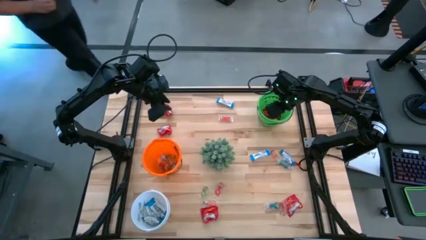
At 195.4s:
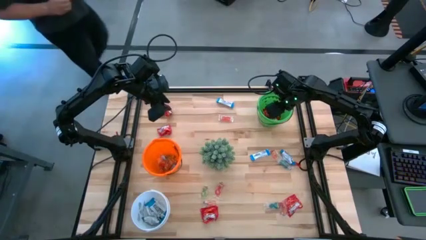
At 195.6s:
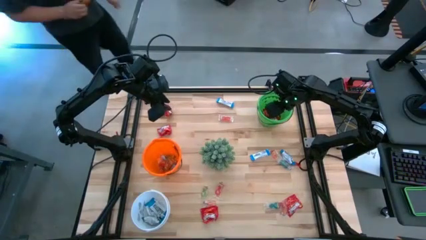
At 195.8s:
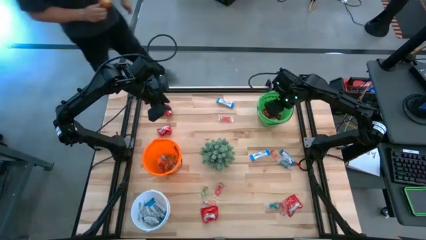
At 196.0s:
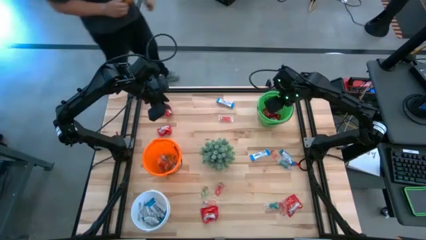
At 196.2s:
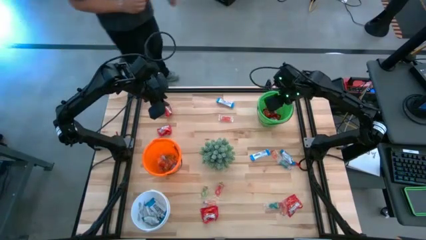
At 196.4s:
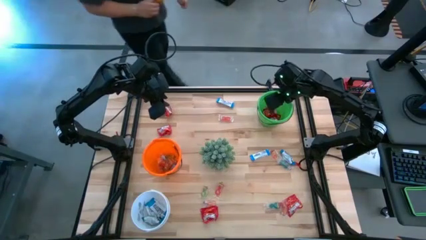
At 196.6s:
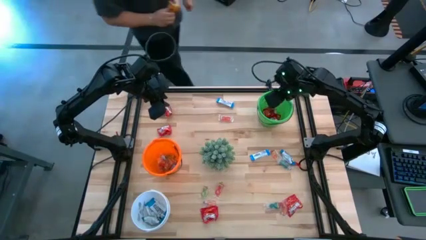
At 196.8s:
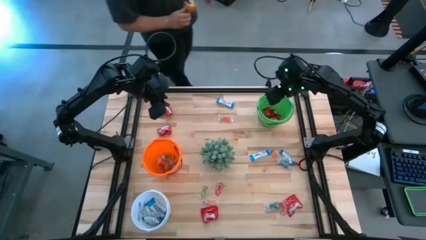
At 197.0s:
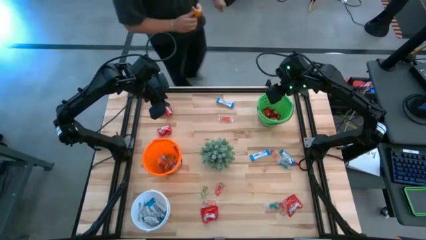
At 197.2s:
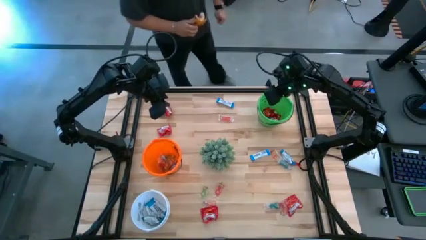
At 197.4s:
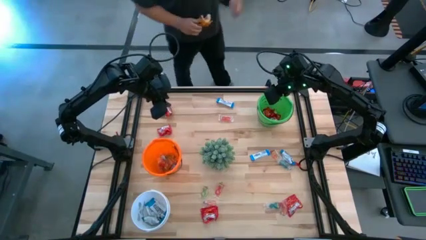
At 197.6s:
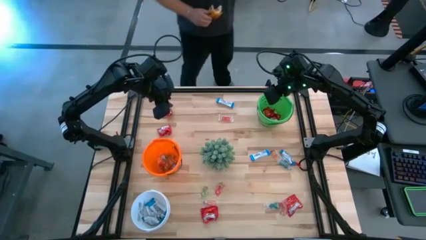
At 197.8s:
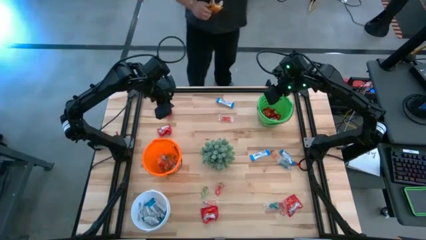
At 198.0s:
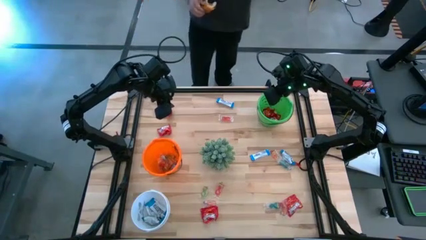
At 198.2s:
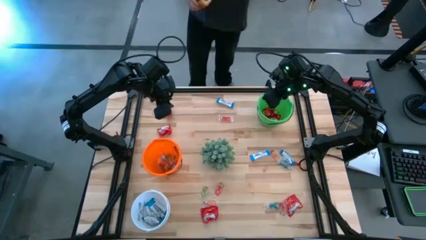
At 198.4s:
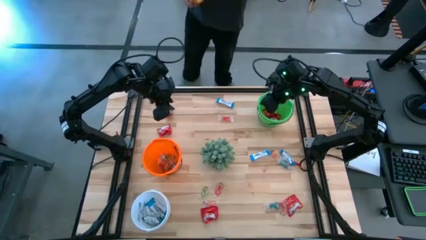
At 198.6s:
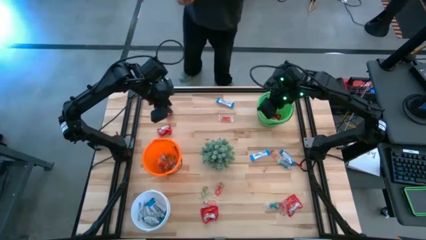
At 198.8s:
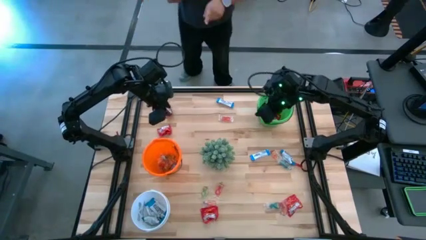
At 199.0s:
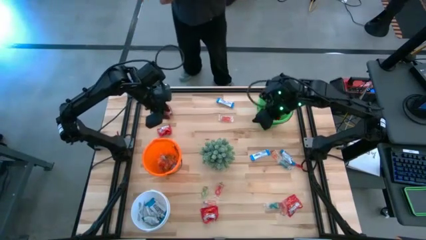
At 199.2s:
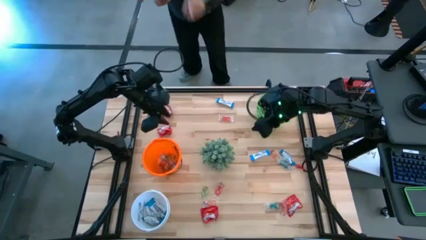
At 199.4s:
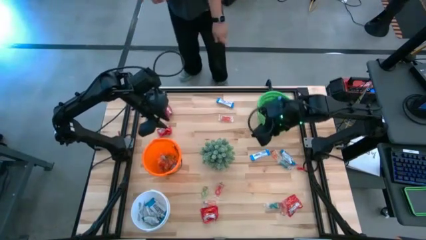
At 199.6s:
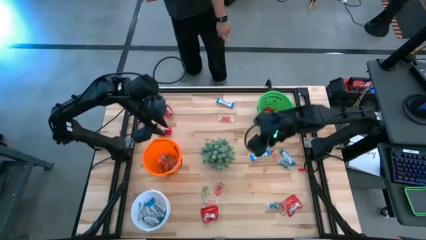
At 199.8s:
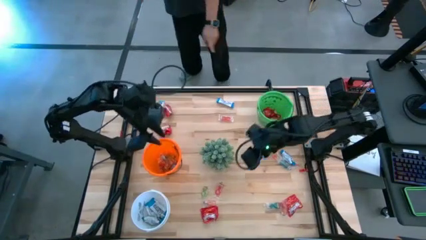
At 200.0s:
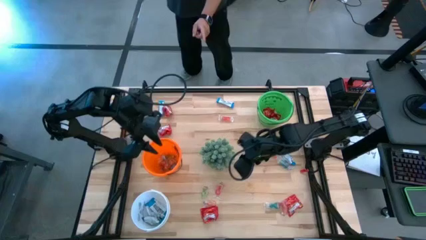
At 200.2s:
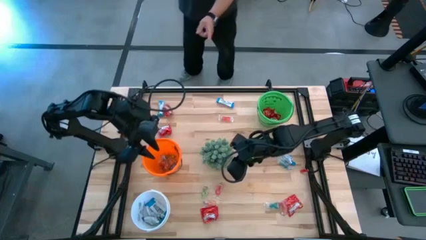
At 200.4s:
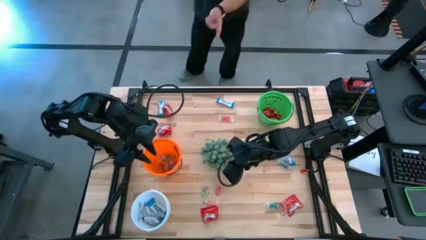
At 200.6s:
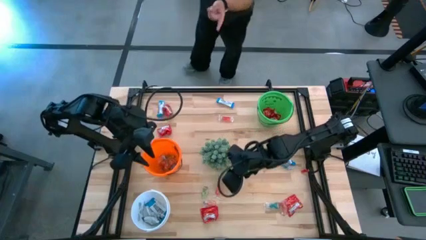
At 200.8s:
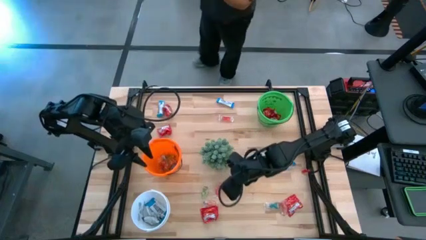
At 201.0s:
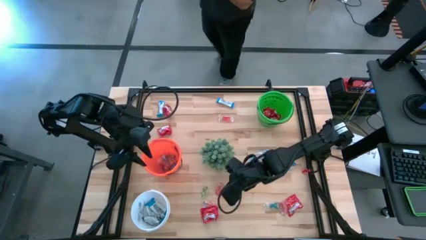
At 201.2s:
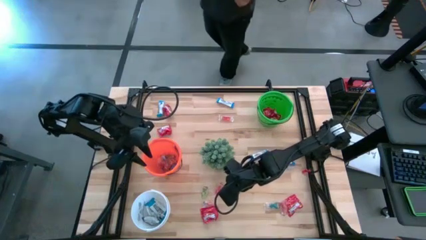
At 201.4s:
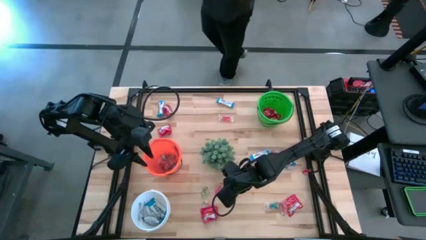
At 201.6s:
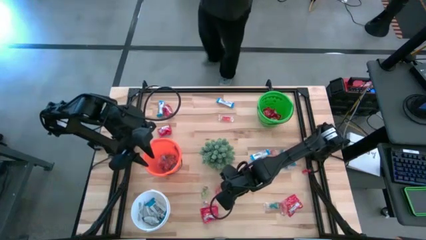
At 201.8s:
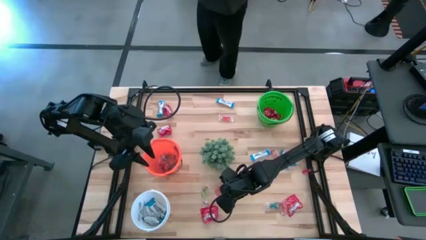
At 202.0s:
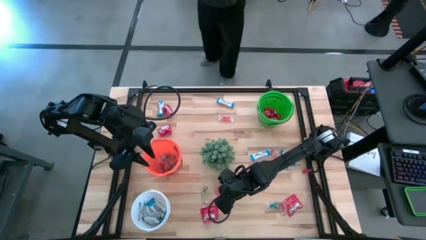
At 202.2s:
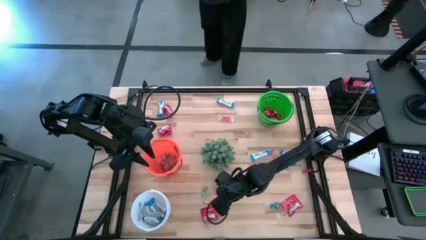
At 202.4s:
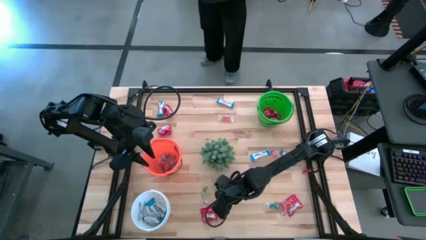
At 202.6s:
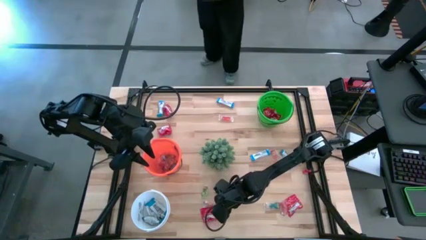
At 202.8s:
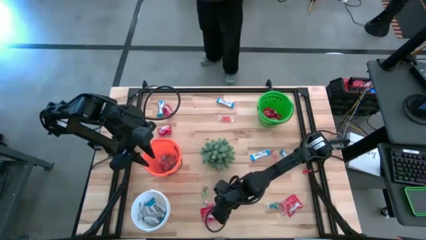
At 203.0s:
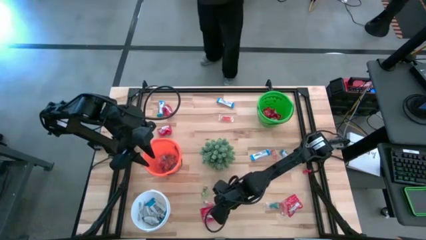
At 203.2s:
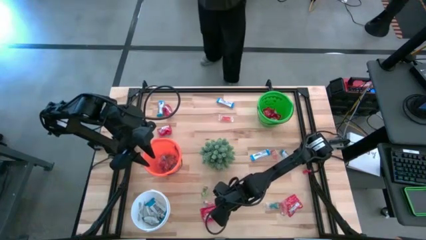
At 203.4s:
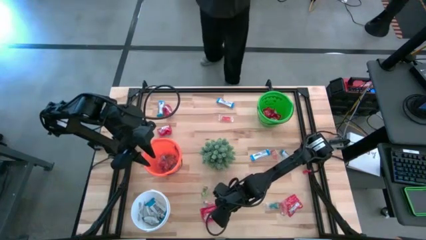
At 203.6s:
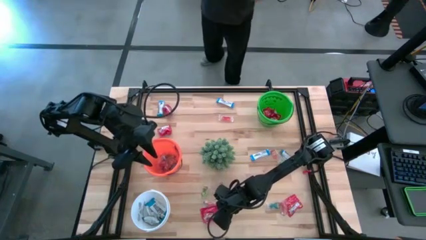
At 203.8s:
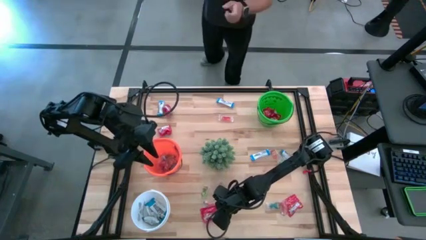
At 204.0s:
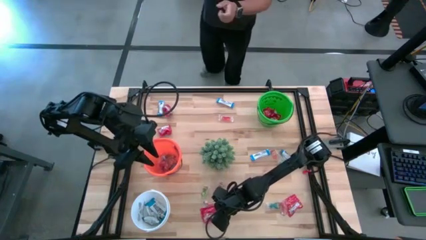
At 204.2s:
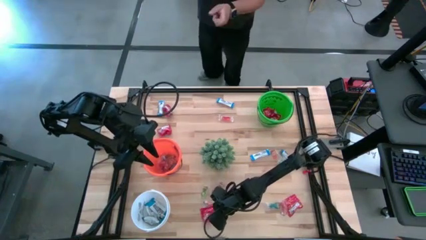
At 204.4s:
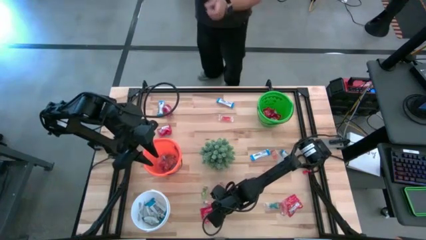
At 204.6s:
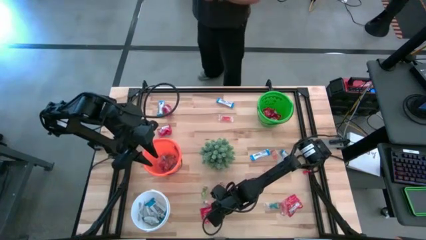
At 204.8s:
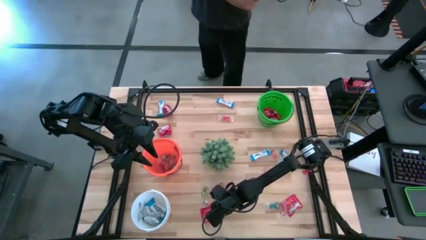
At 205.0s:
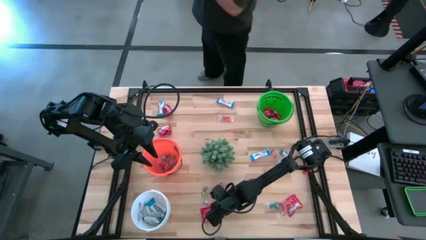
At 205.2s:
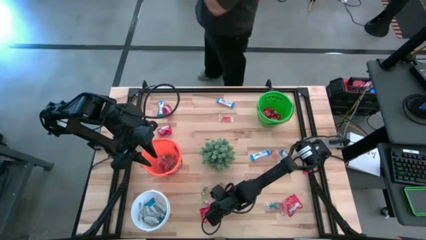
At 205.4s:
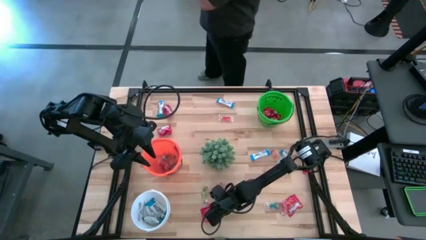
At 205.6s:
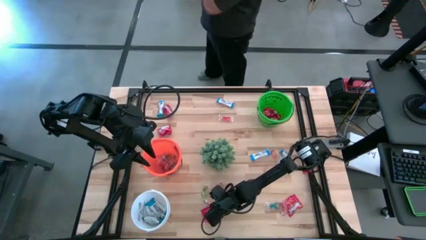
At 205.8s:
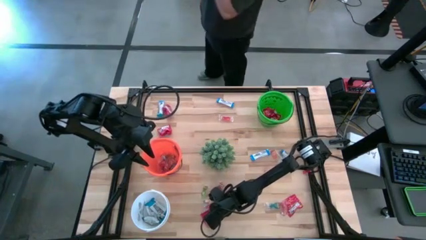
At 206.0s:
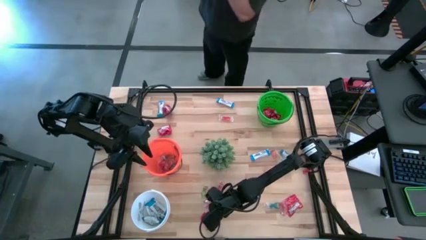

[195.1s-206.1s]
Task: Sort candy
Put the red candy into the green bucket

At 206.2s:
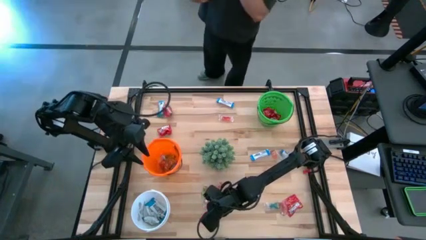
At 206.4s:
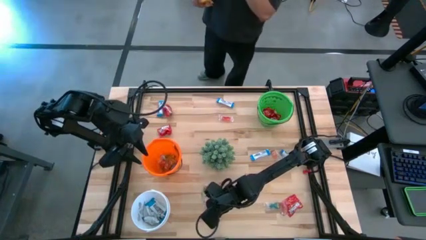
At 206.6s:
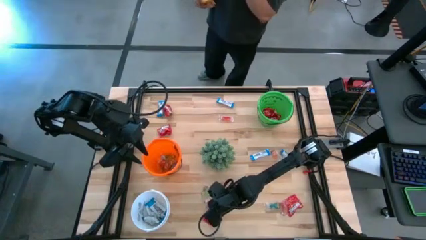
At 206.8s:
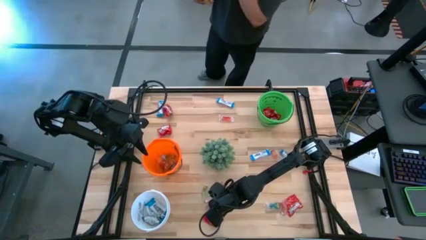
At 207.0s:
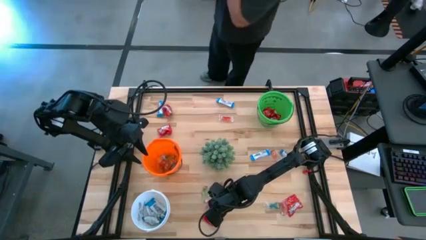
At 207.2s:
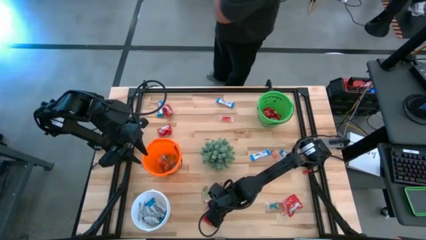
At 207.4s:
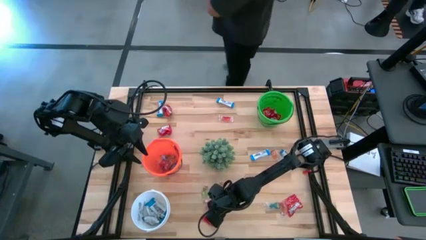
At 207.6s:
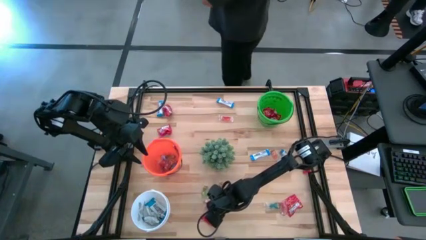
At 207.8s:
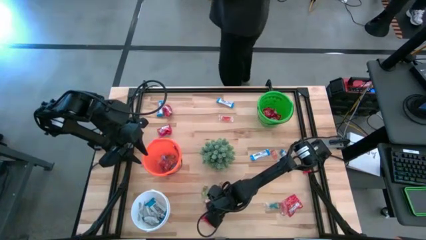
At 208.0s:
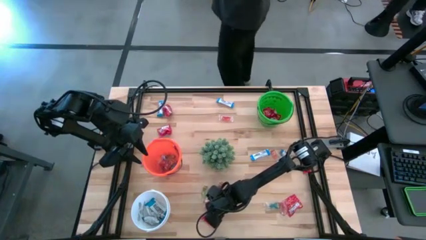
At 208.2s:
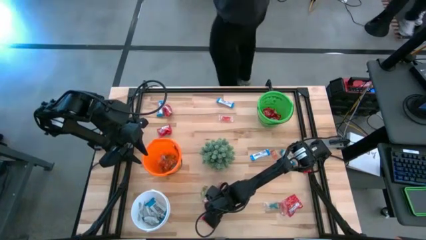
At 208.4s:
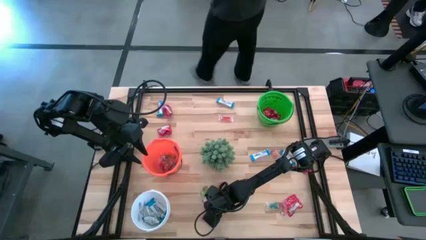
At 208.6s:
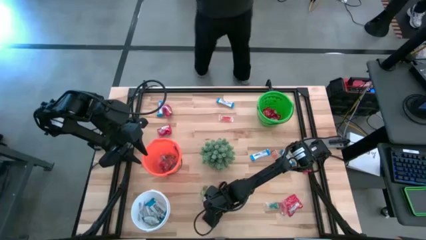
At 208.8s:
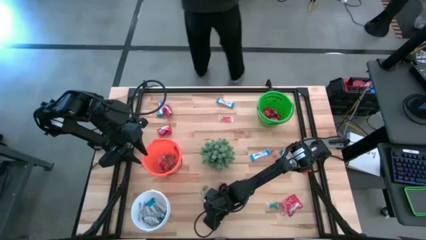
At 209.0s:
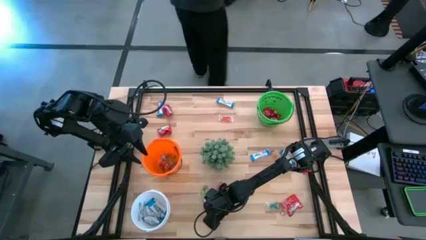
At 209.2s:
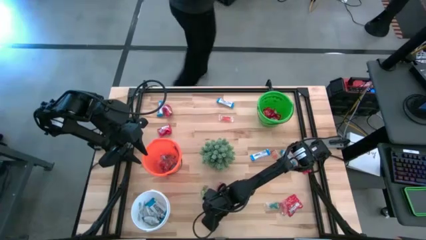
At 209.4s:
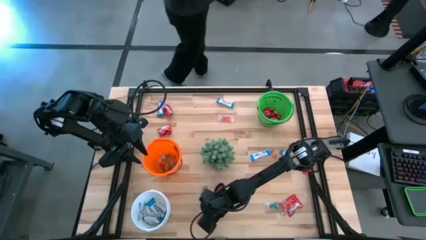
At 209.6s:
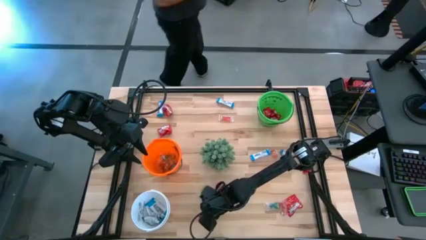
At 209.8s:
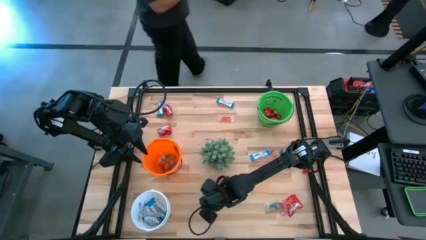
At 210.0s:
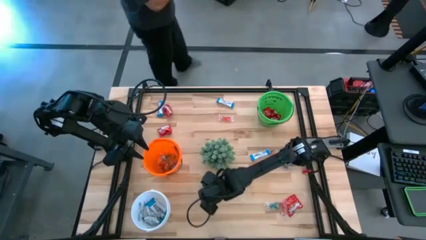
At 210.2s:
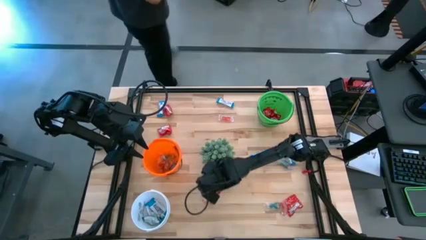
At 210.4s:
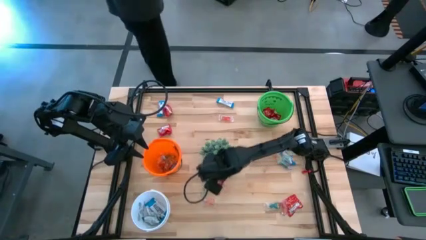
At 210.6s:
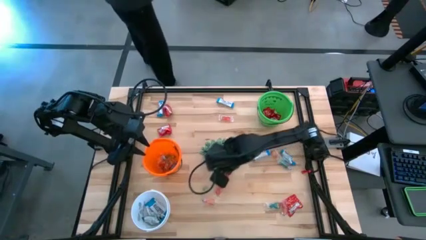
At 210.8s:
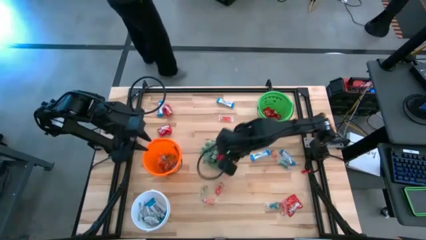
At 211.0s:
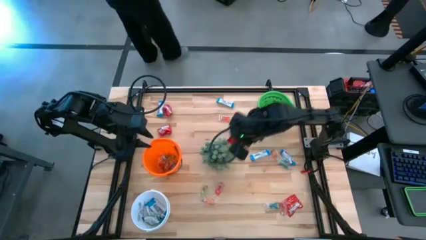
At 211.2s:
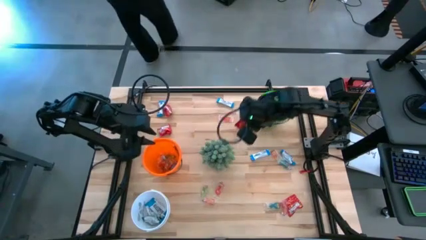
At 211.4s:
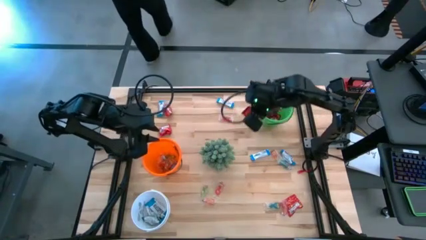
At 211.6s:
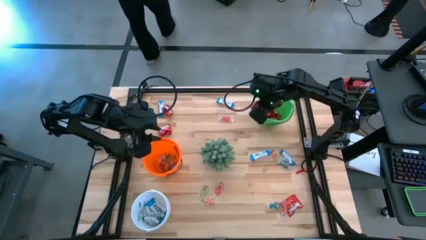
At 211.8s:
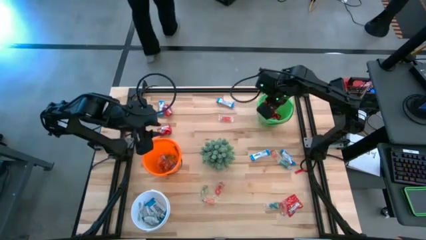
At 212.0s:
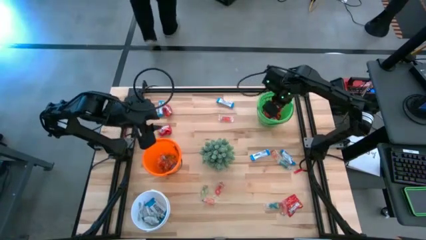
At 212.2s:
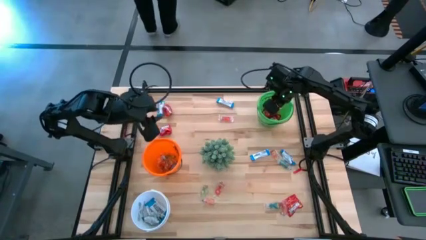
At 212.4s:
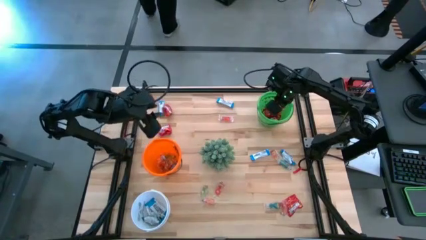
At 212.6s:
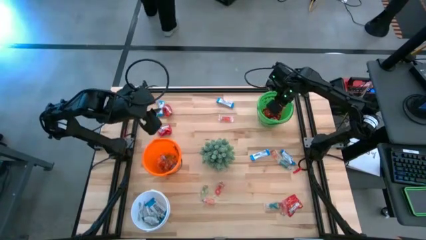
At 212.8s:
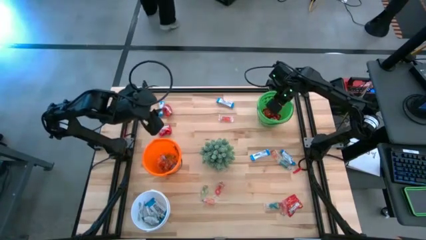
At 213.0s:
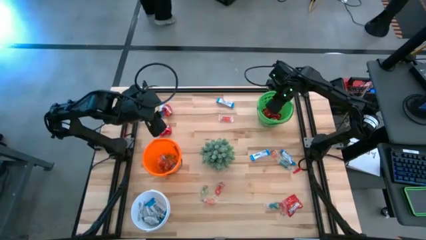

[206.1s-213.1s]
Put the red candy into the green bucket
